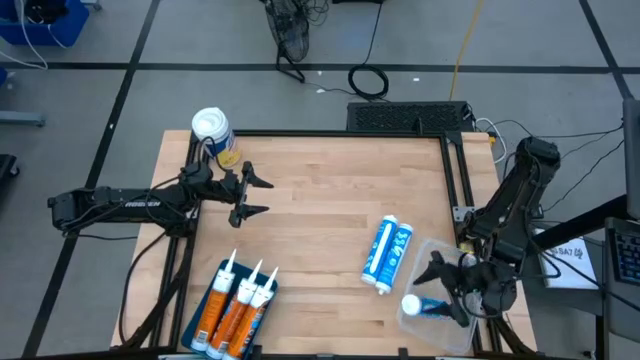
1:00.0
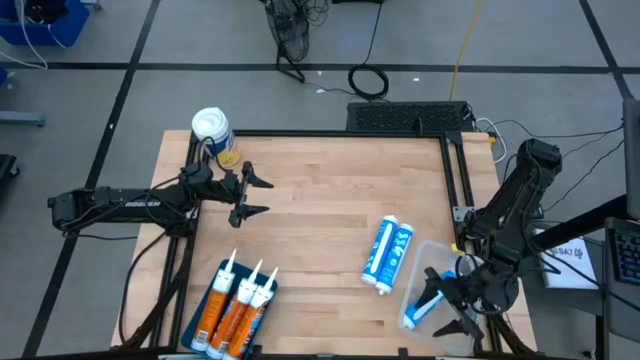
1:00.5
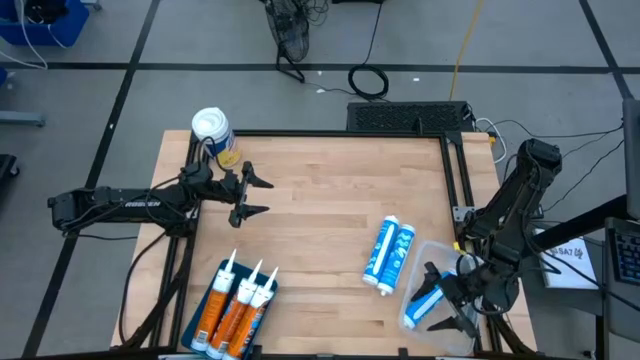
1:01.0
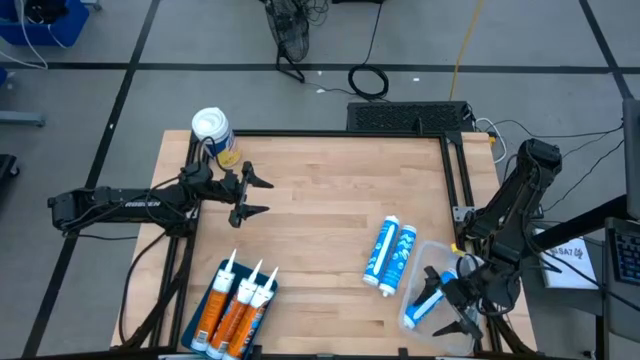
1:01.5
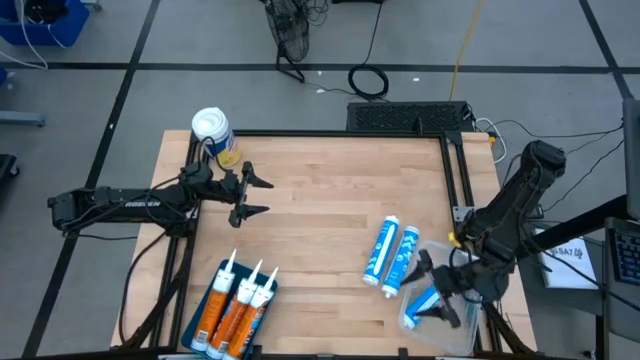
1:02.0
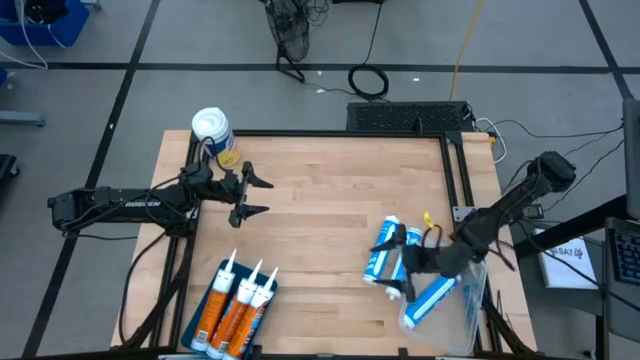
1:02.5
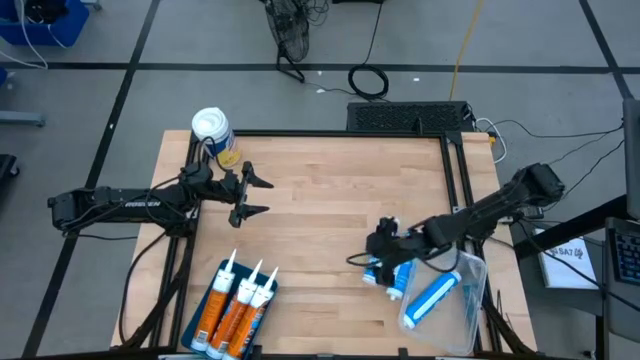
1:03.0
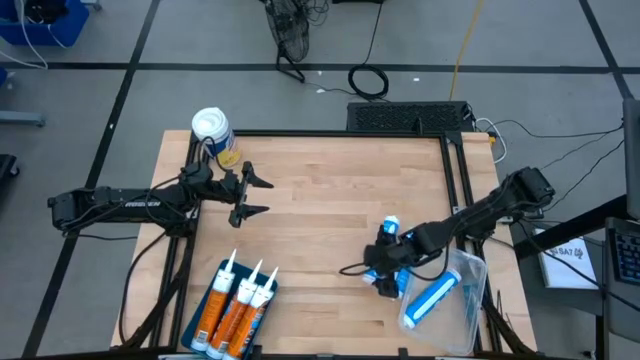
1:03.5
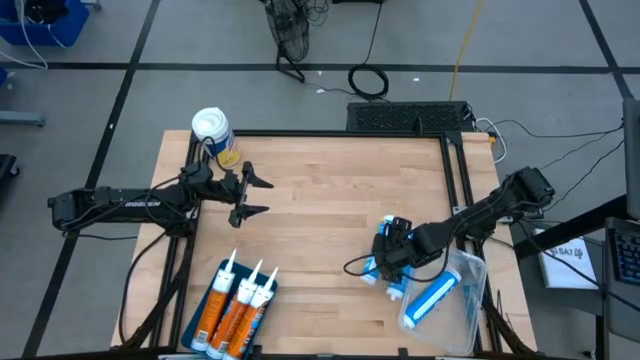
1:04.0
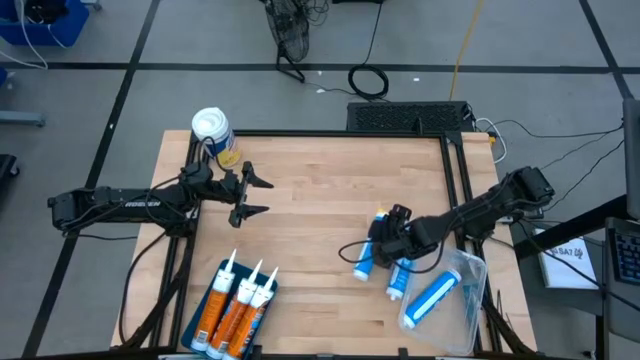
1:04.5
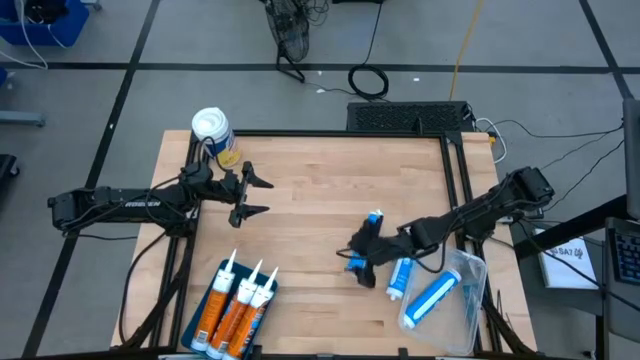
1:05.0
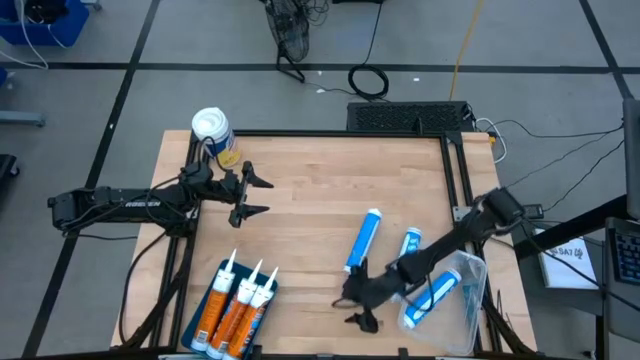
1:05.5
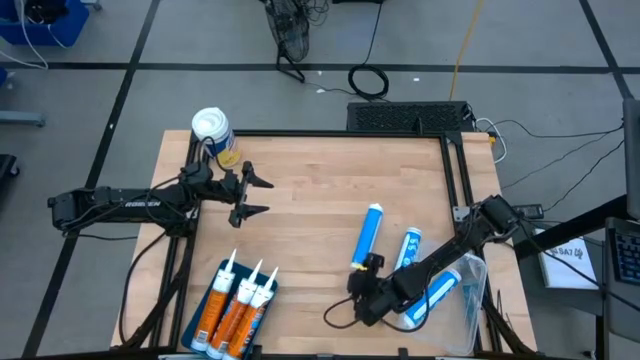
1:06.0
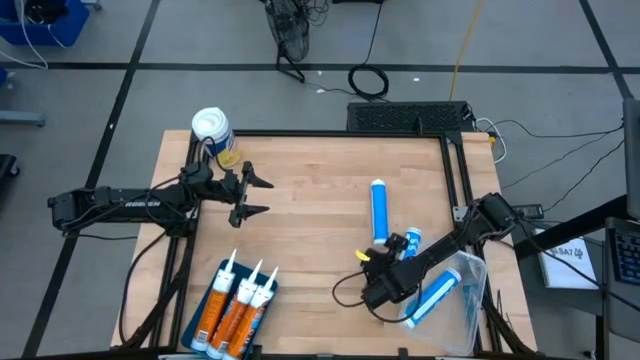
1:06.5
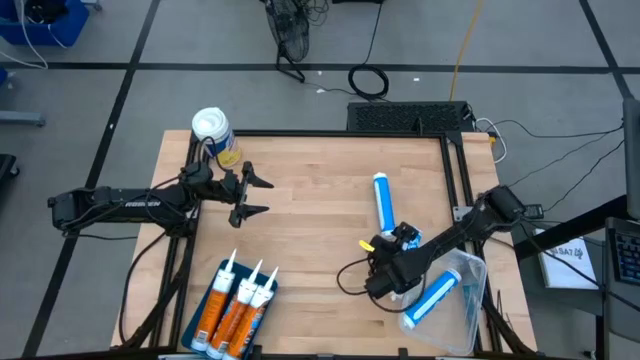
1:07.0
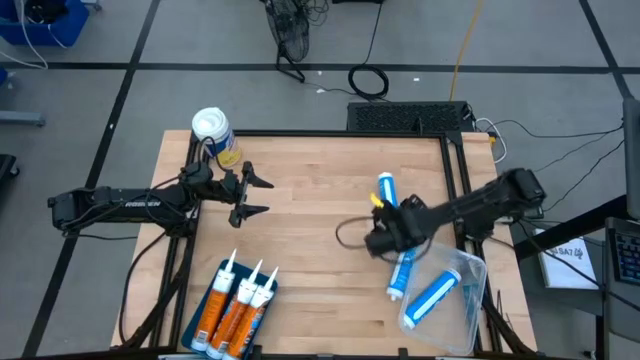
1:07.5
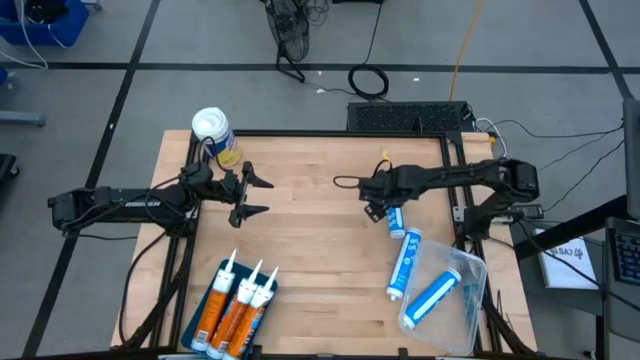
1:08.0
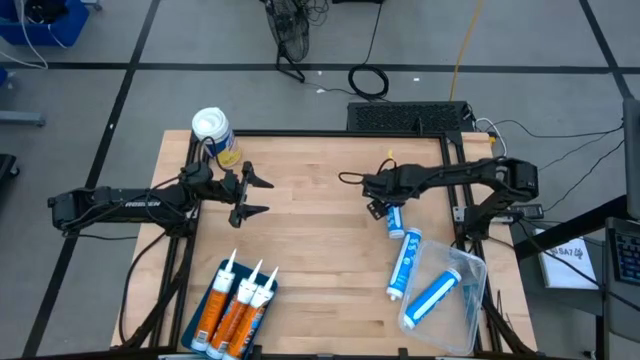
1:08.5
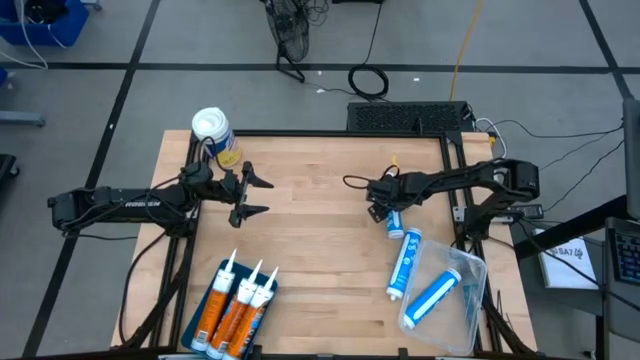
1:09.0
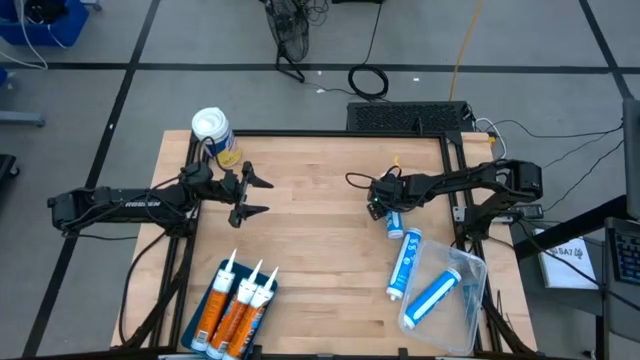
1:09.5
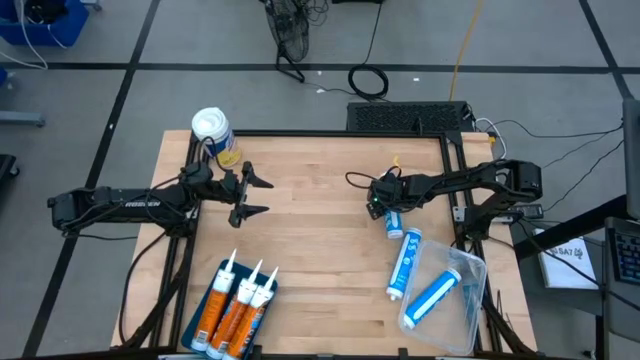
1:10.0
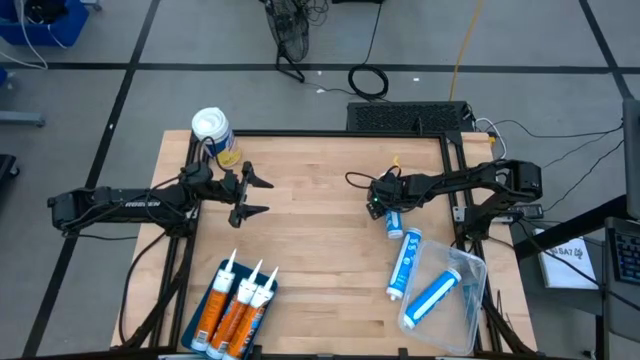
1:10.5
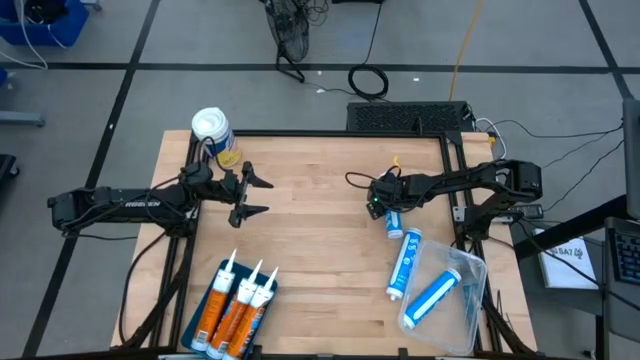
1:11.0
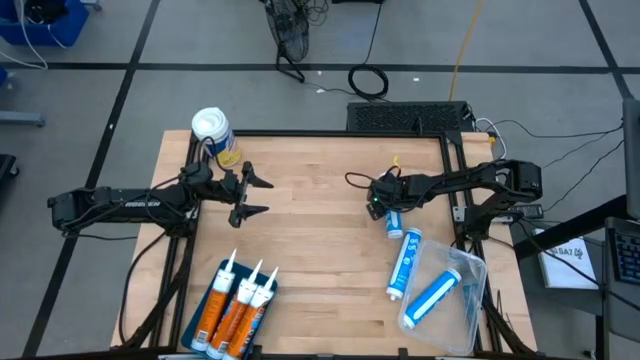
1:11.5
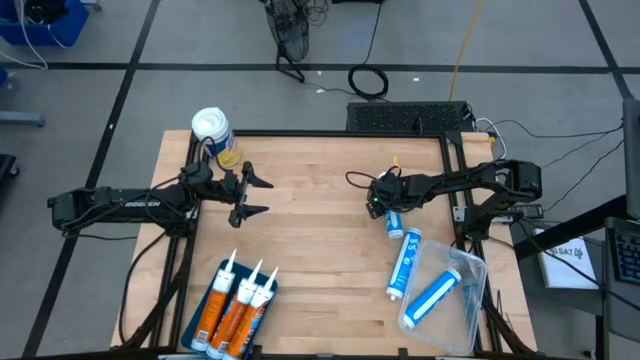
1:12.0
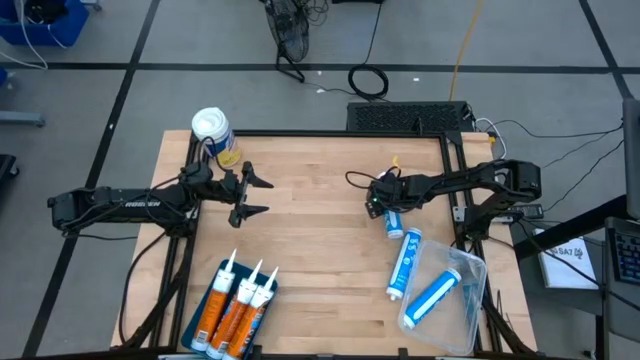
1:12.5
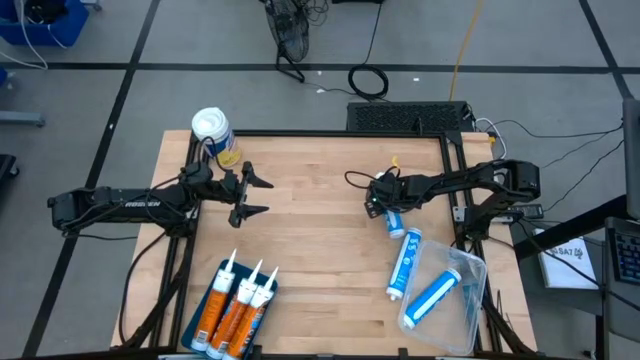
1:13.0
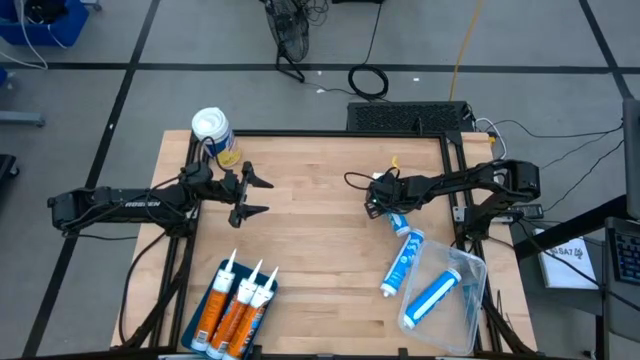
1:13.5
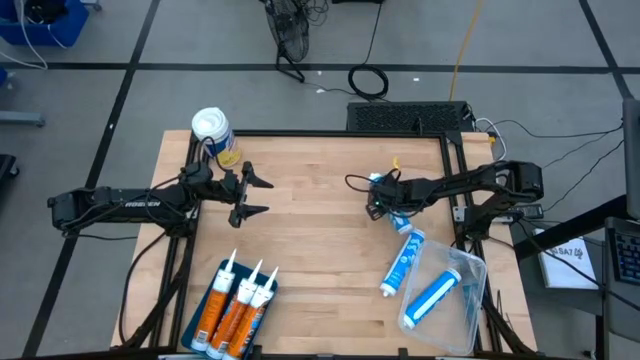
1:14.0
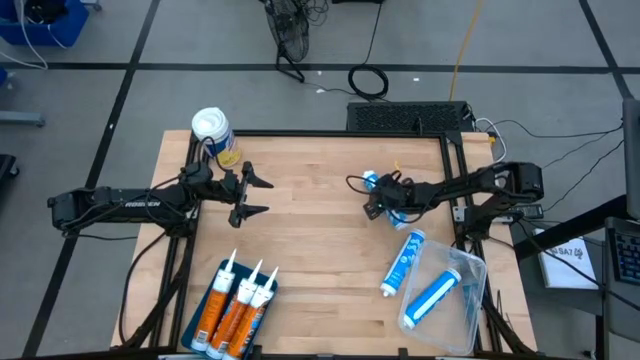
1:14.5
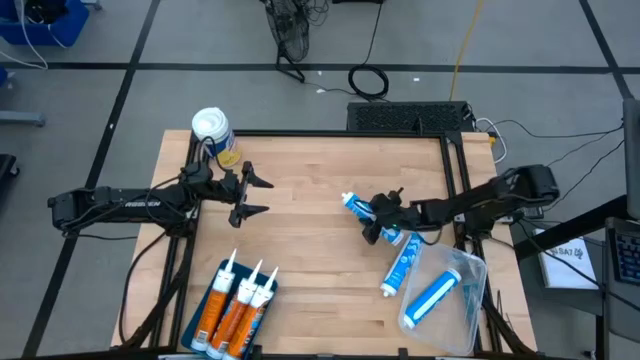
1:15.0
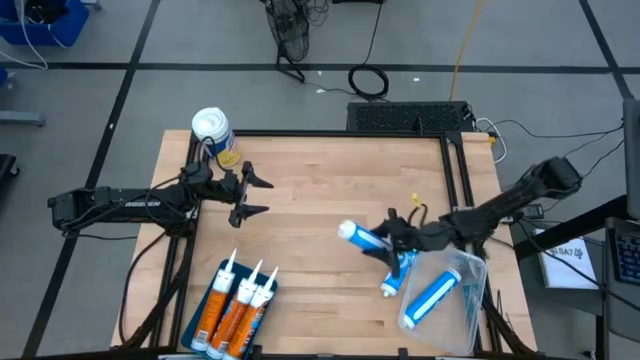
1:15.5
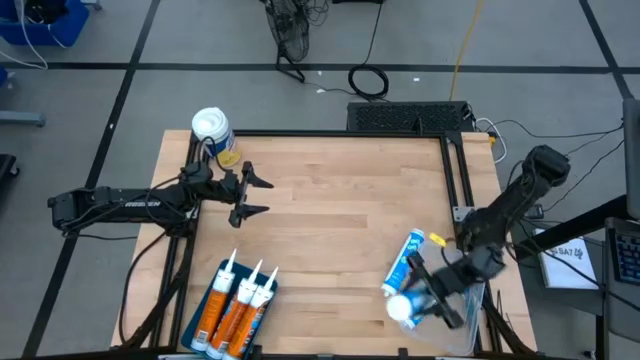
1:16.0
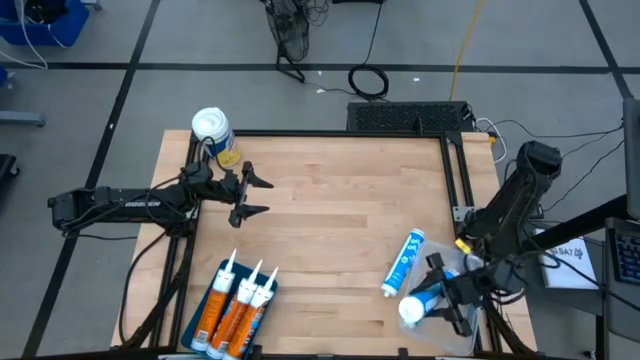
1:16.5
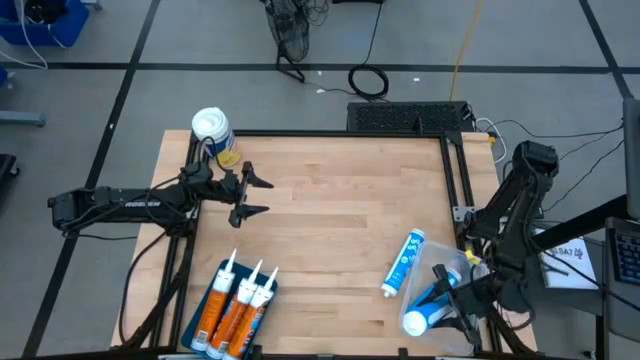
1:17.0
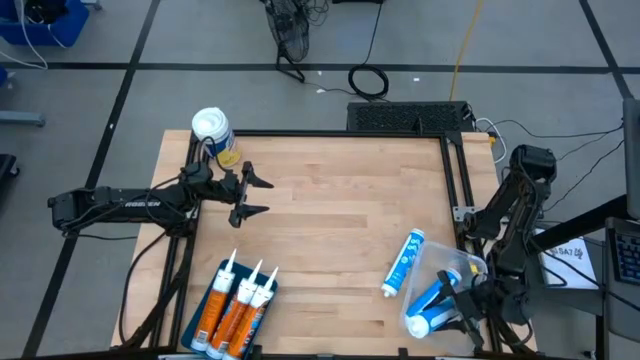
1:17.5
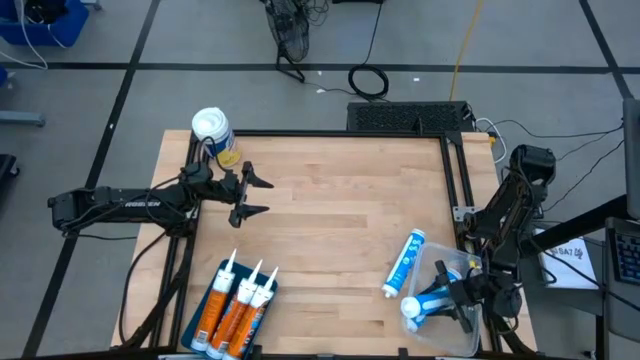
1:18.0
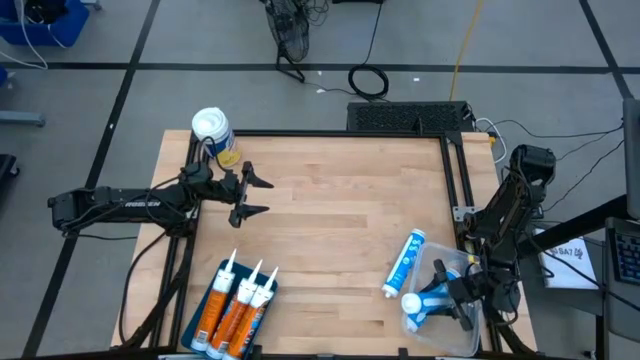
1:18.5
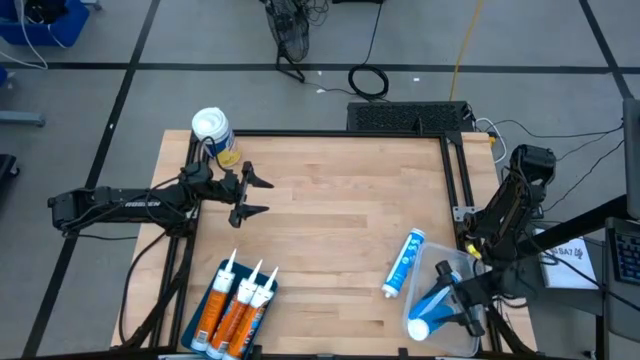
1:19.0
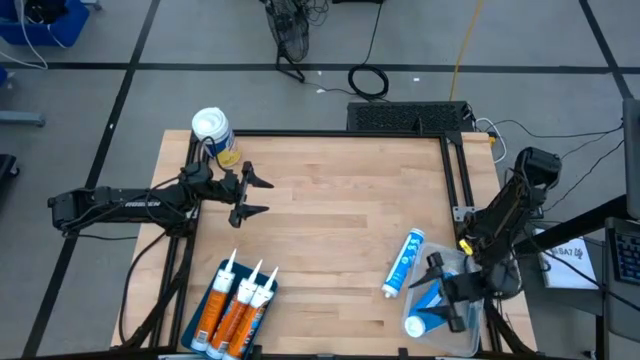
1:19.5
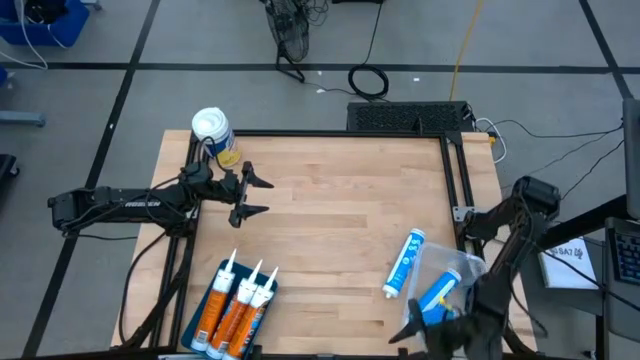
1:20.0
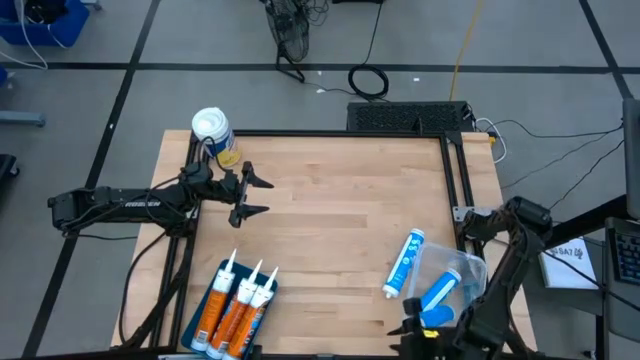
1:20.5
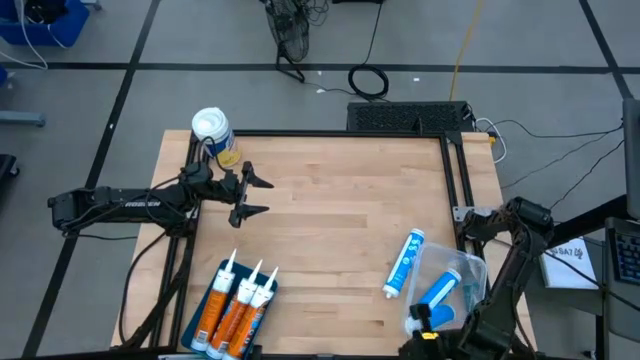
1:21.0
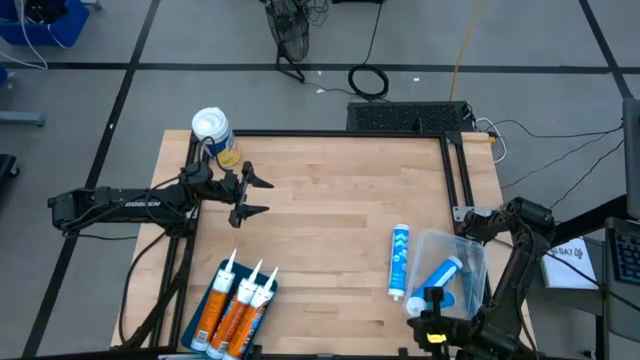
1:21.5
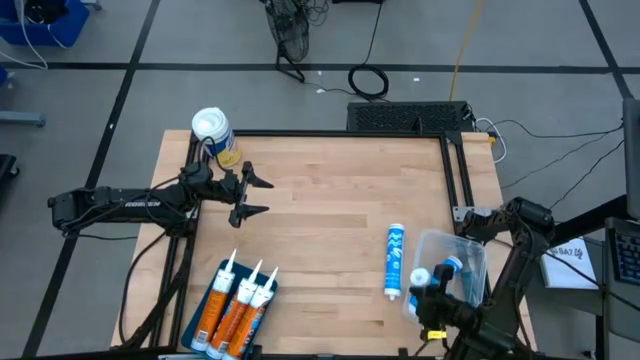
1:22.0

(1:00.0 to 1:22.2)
Task: Pick & place silicon tubes, Sealant and Lysol wipes
Put the left blue sealant into the transparent bin

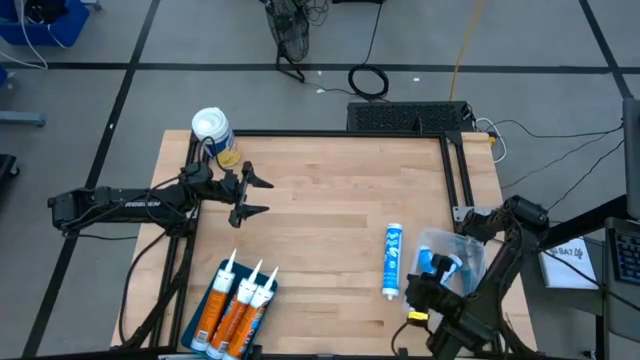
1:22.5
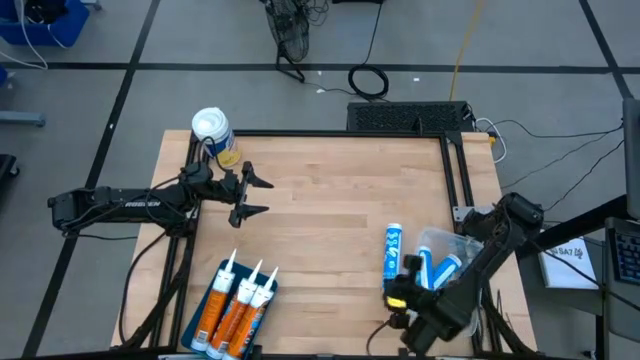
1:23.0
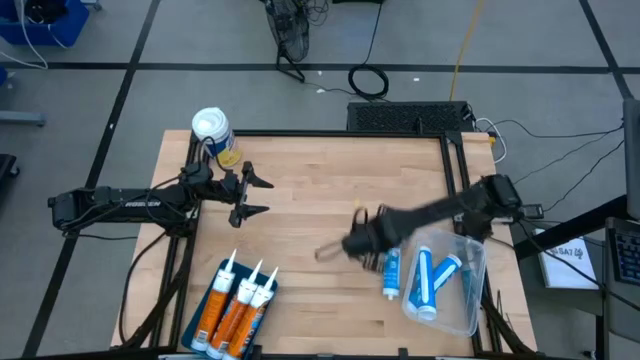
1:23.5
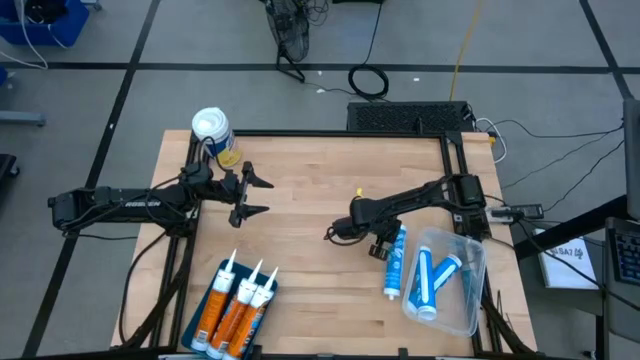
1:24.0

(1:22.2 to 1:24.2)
Put the blue sealant into the transparent bin
